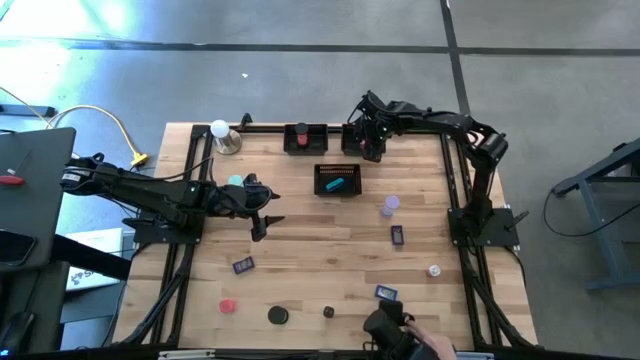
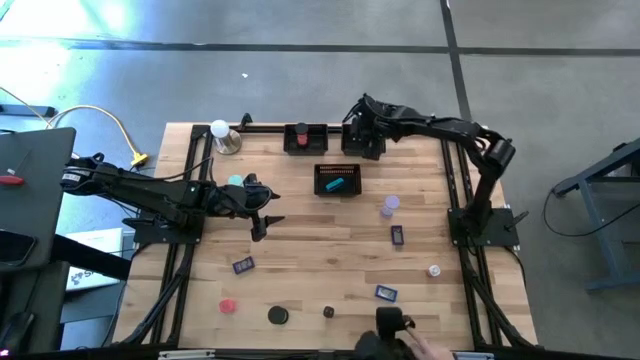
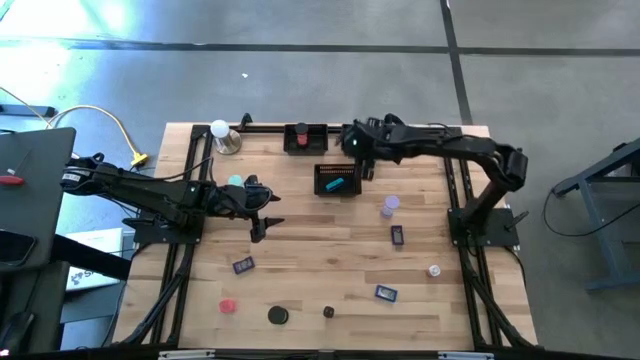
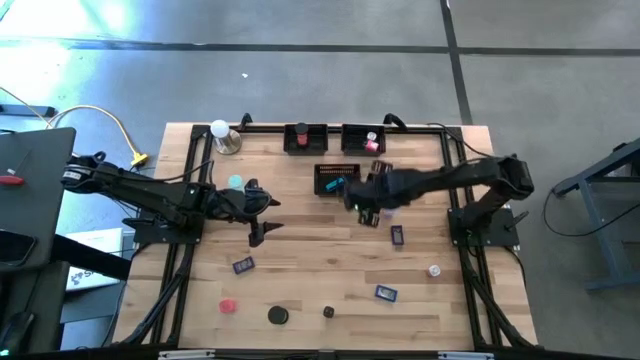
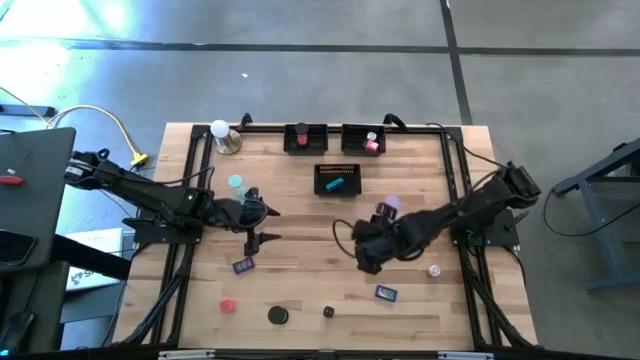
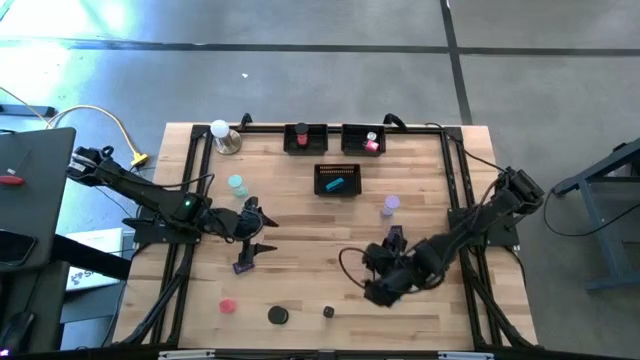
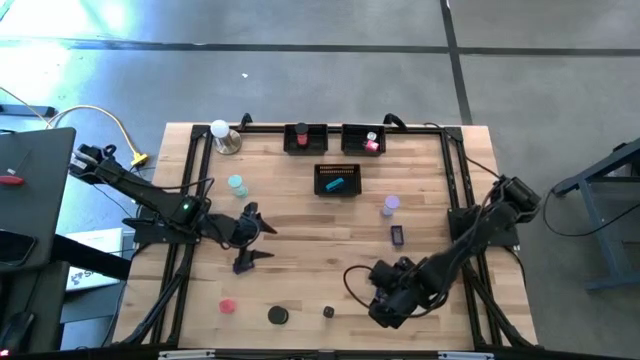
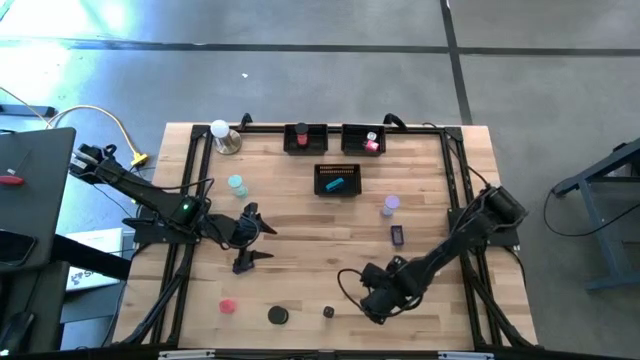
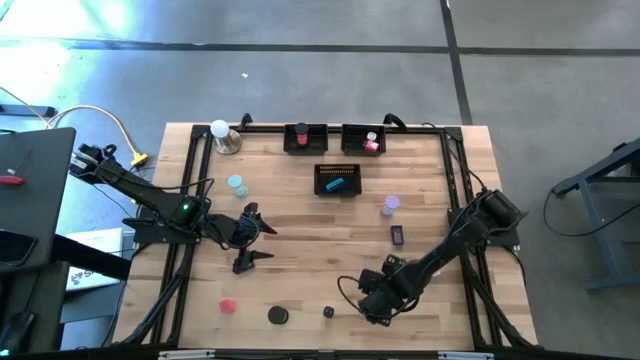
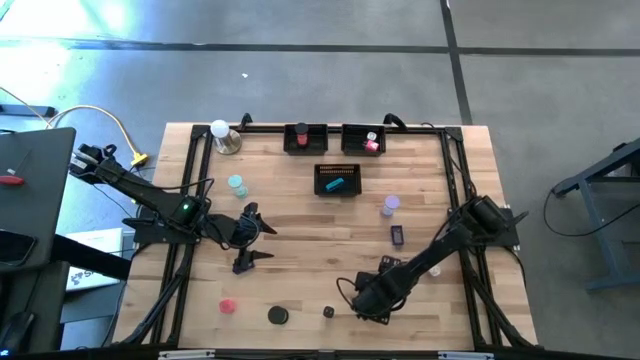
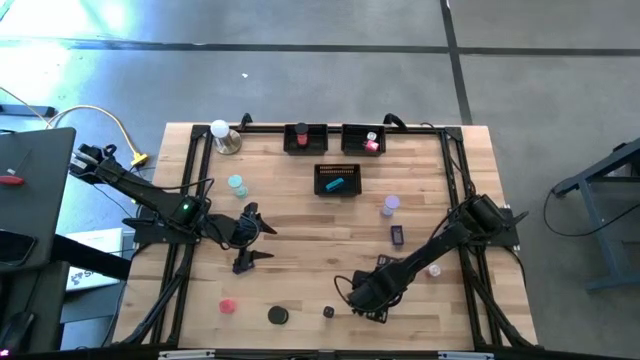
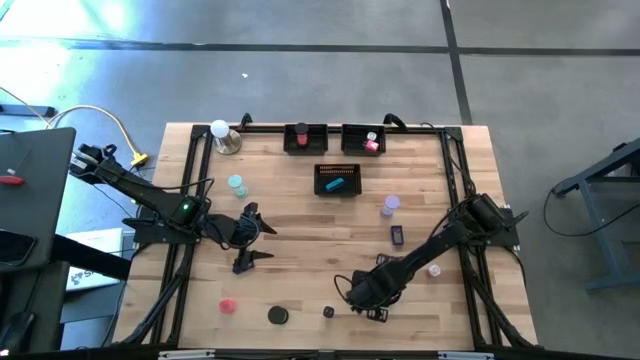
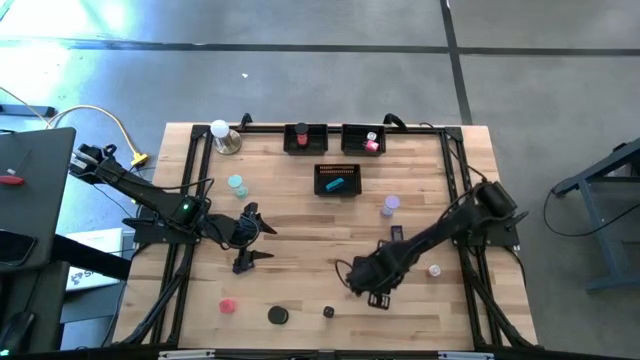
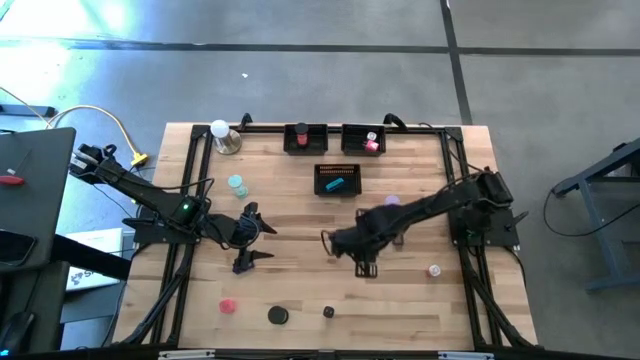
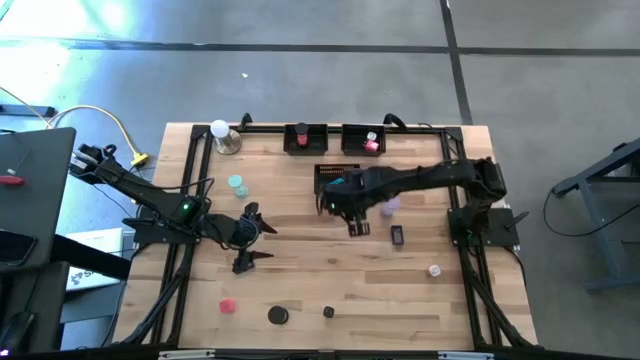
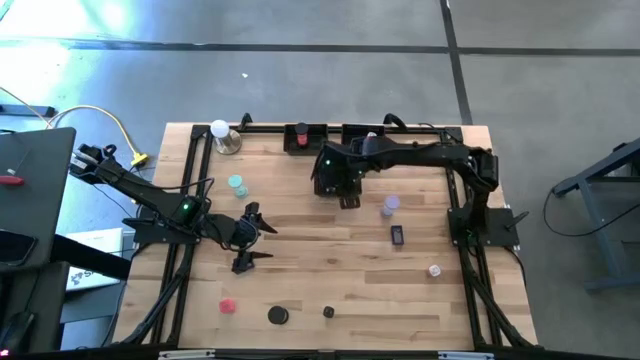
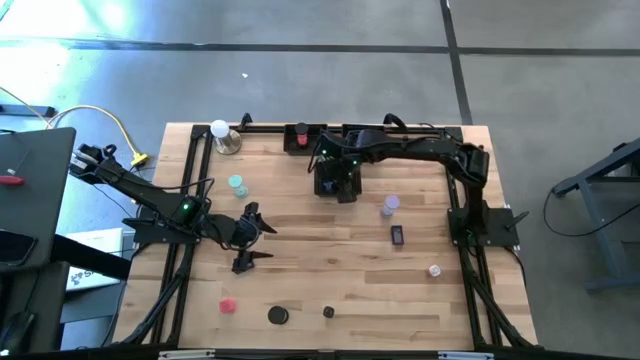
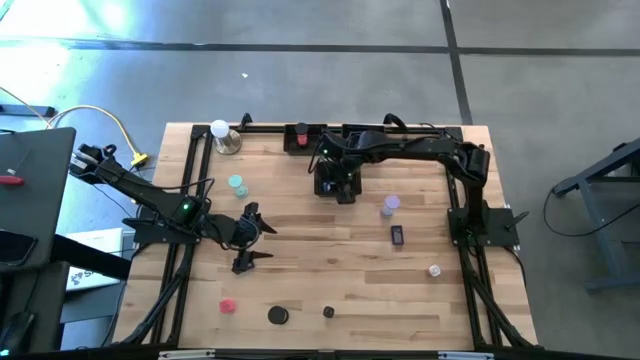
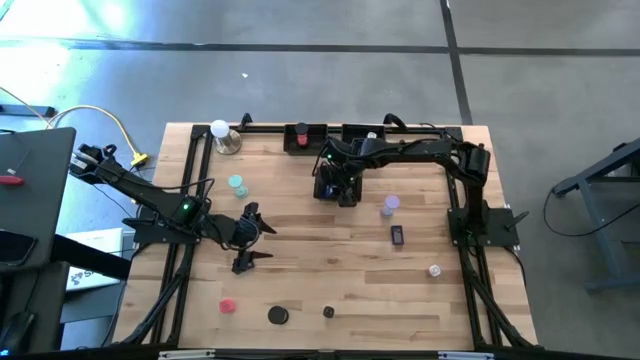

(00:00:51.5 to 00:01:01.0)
Task: Pick & Place Office items
Put the bottom right blue digital timer into the bottom black bin

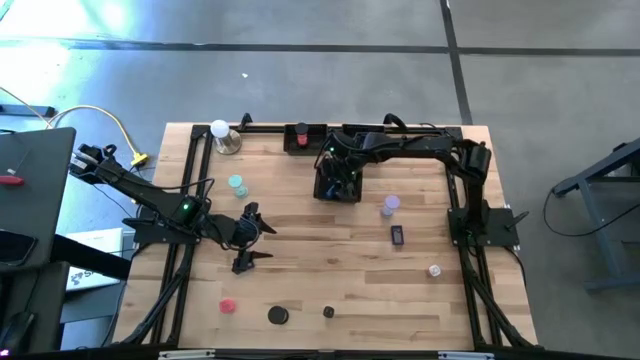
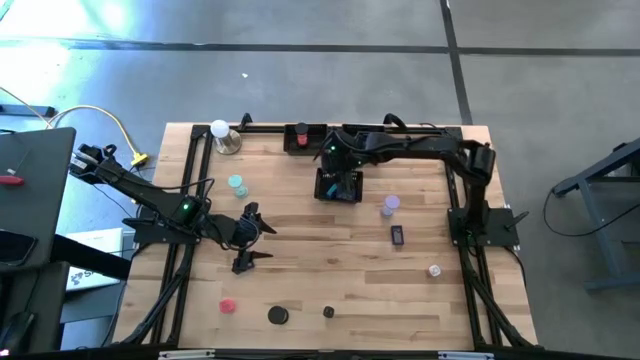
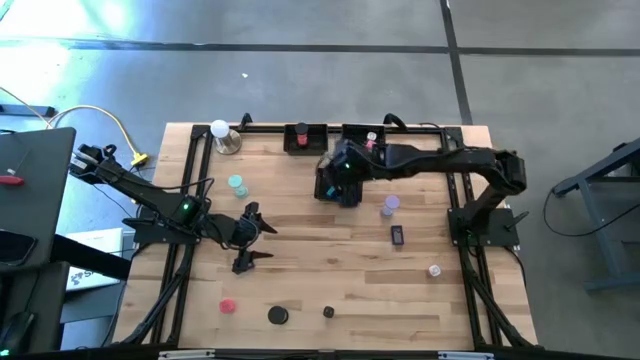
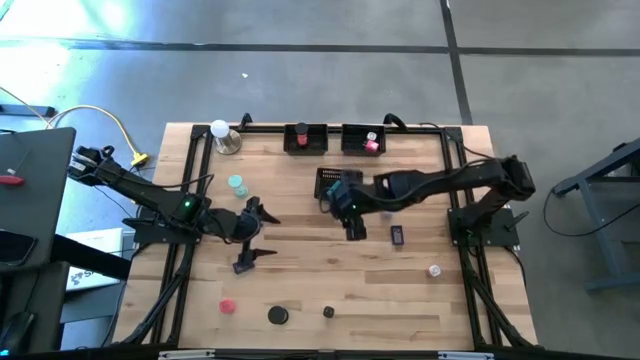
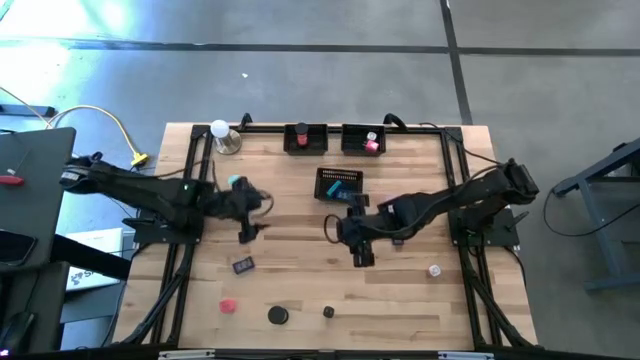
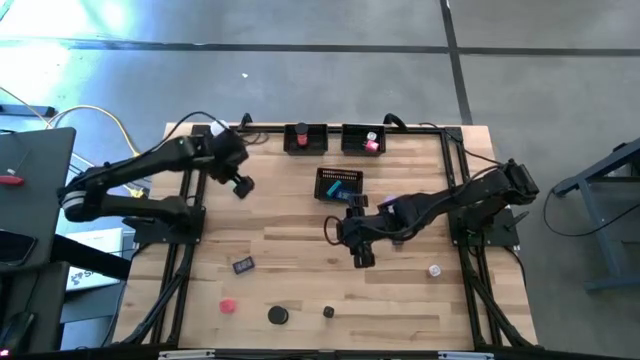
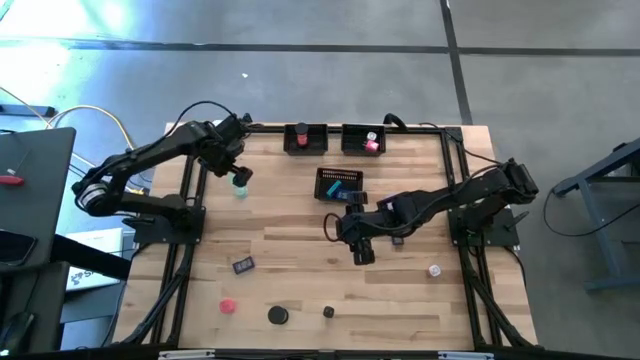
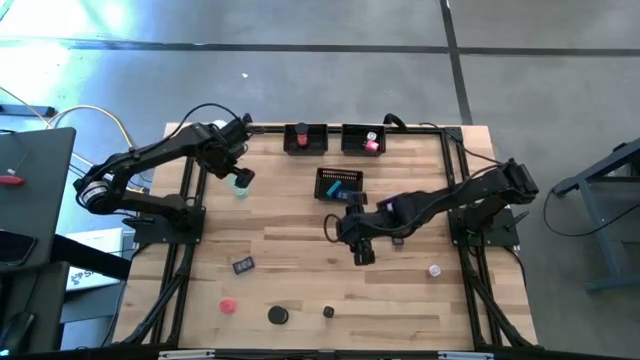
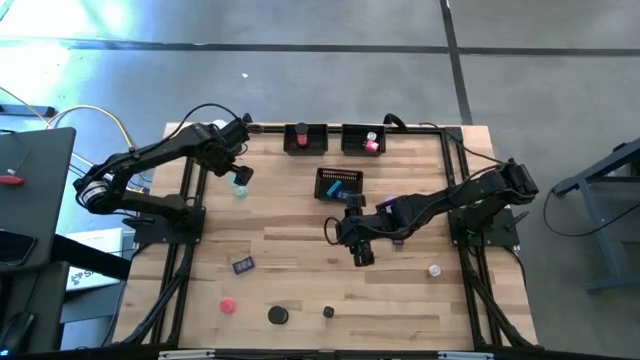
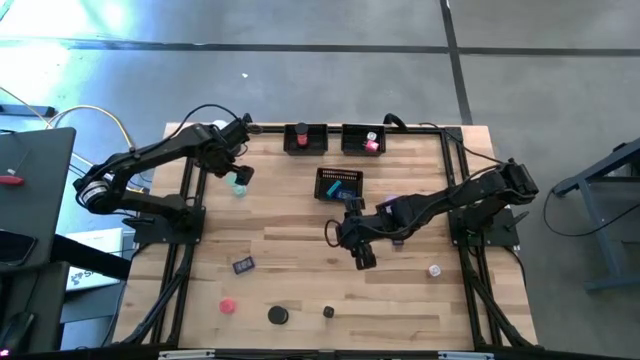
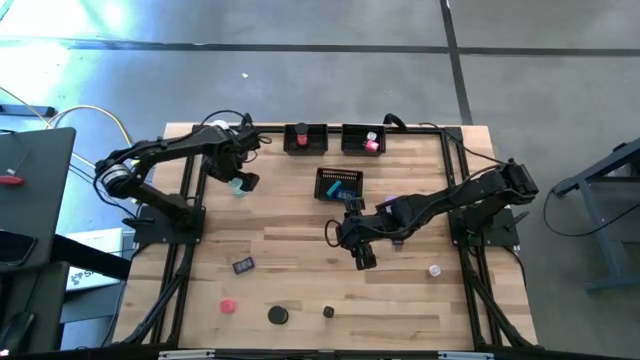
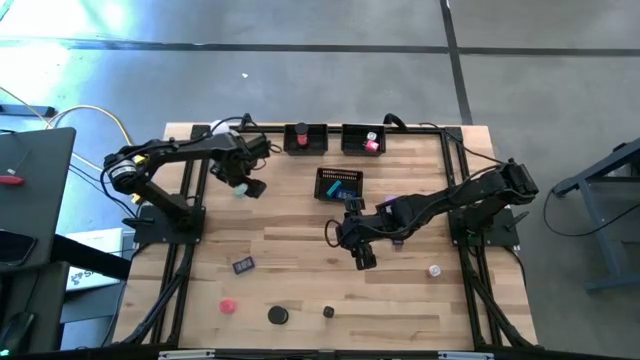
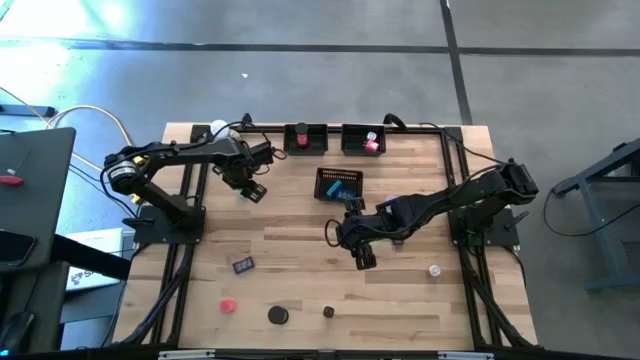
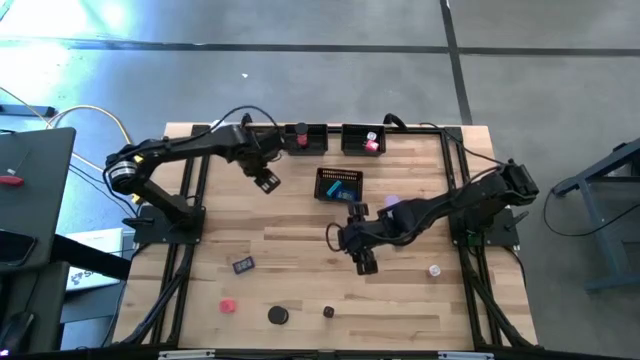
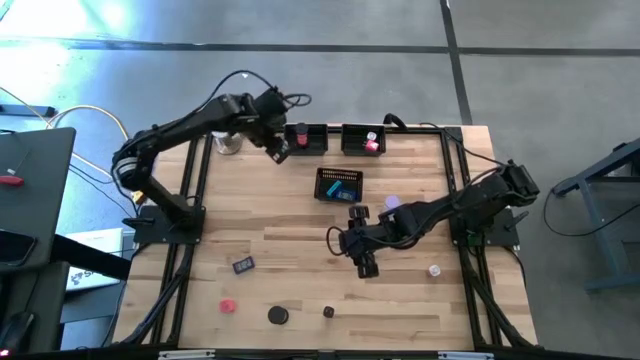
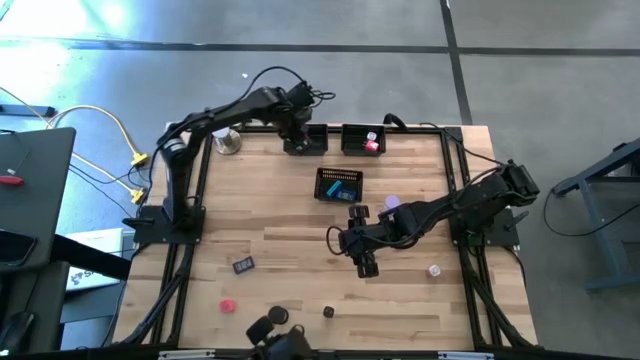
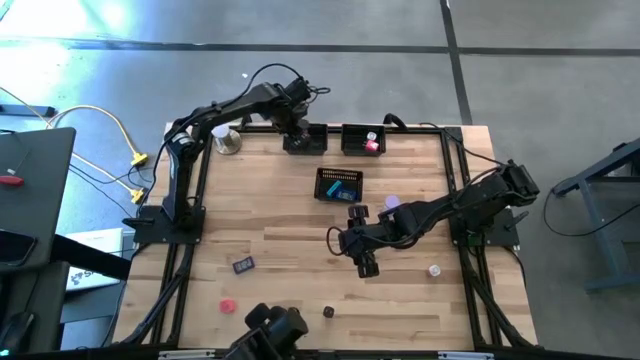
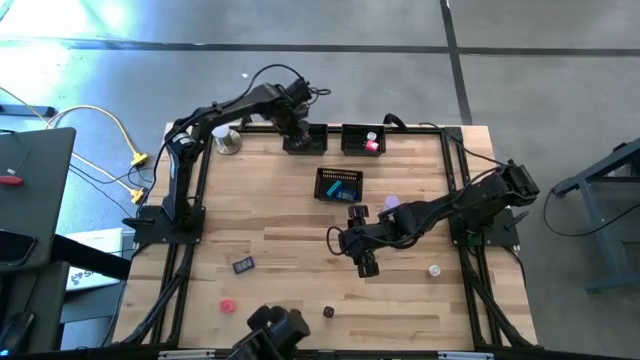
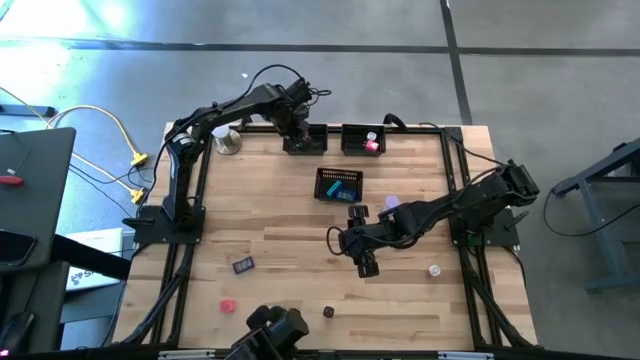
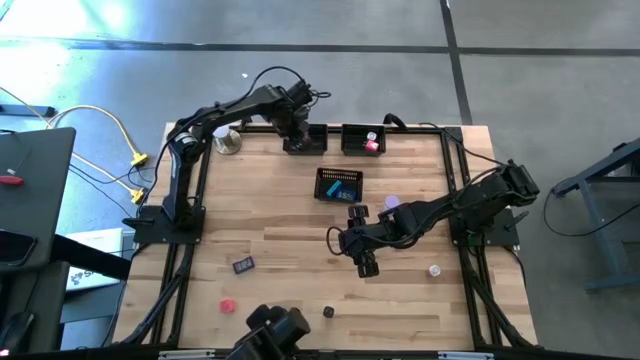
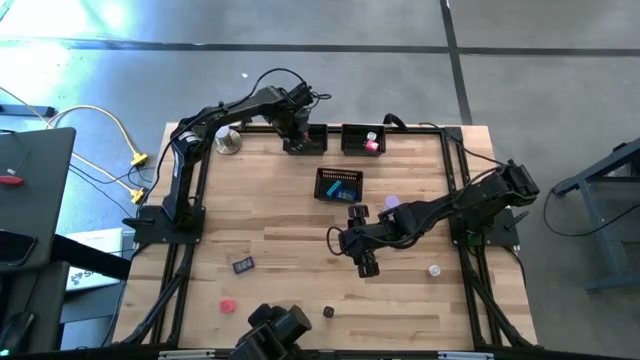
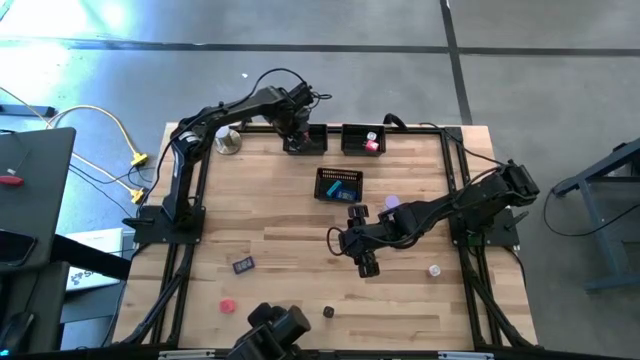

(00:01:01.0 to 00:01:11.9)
Put the light blue hourglass into the top left black bin
